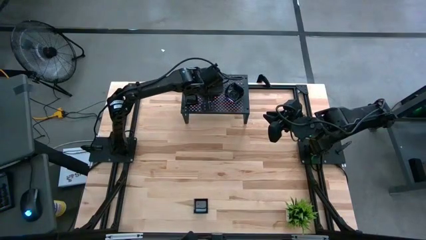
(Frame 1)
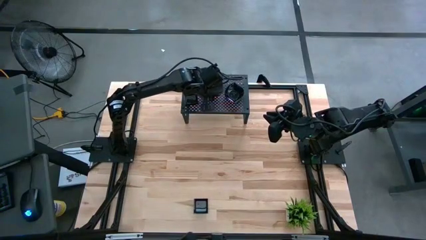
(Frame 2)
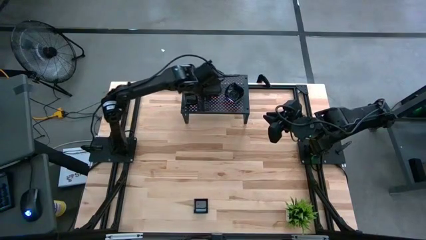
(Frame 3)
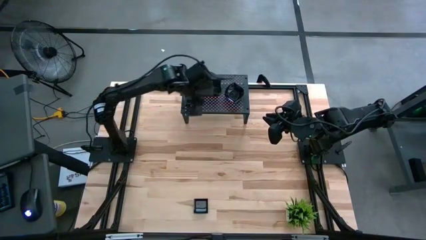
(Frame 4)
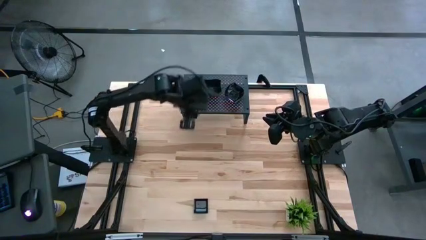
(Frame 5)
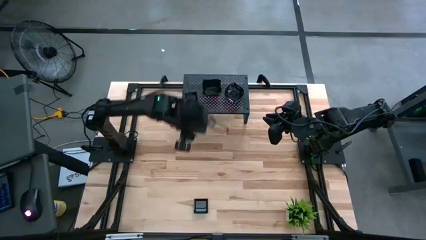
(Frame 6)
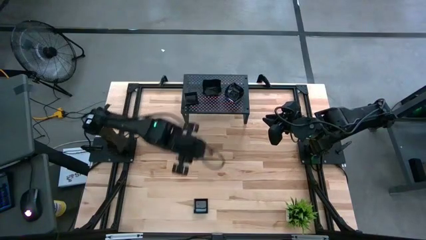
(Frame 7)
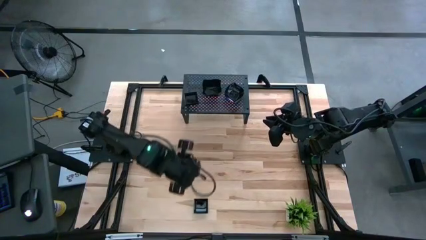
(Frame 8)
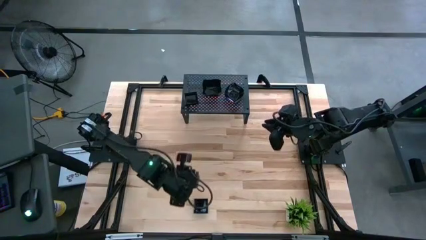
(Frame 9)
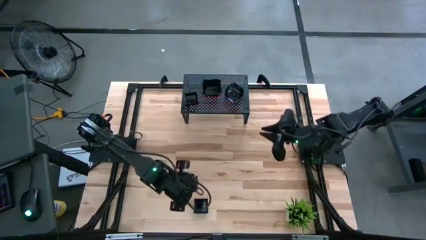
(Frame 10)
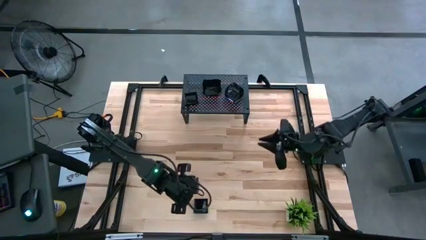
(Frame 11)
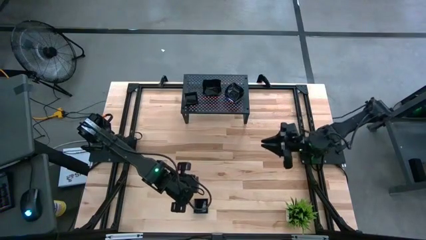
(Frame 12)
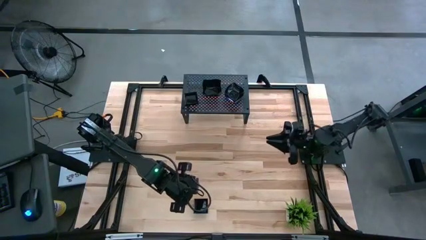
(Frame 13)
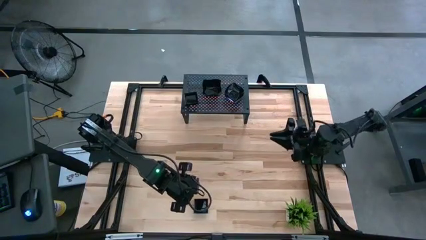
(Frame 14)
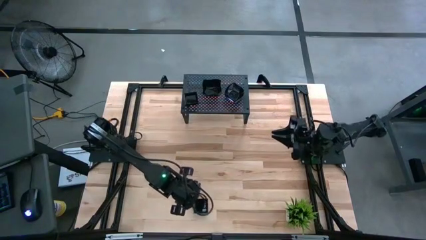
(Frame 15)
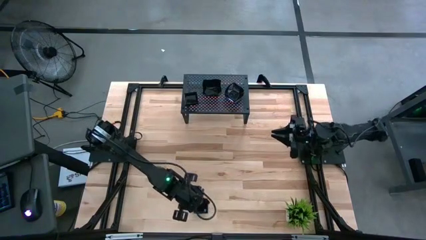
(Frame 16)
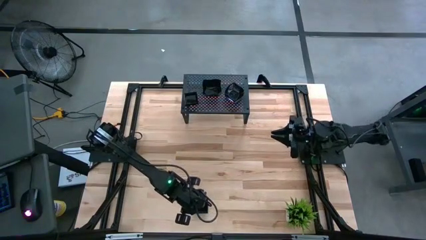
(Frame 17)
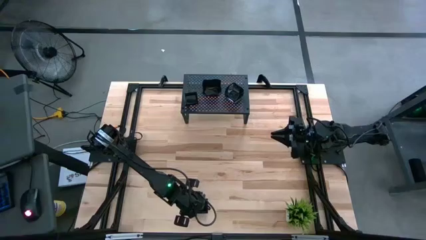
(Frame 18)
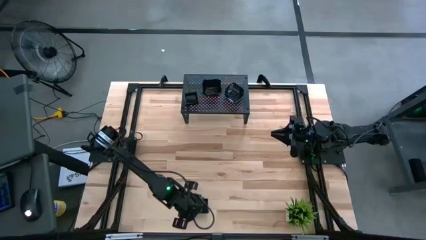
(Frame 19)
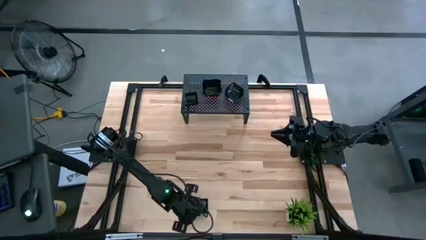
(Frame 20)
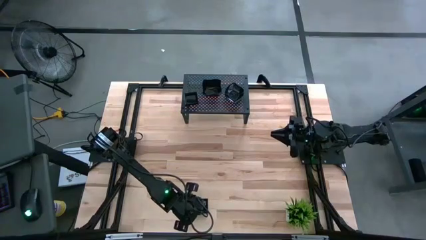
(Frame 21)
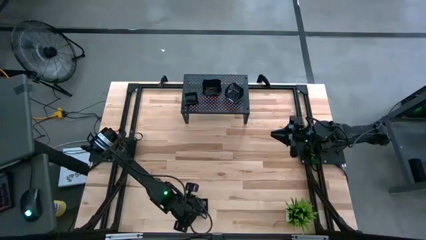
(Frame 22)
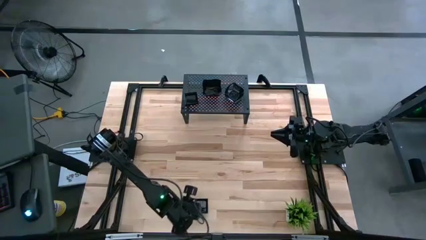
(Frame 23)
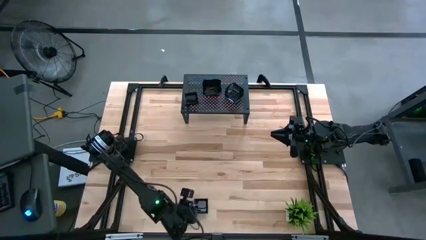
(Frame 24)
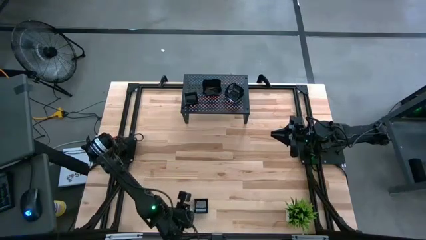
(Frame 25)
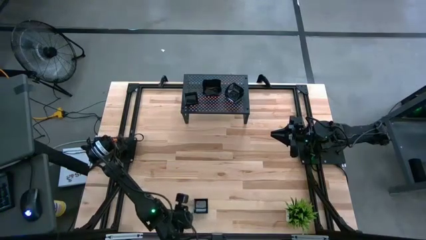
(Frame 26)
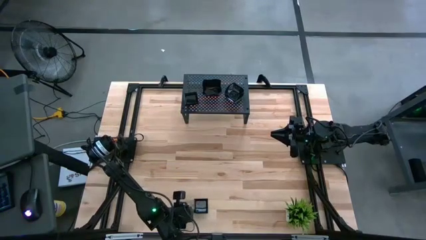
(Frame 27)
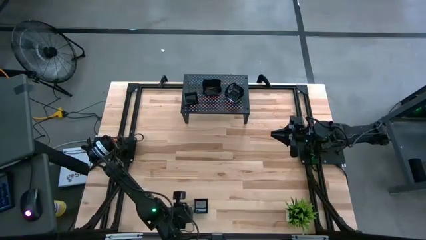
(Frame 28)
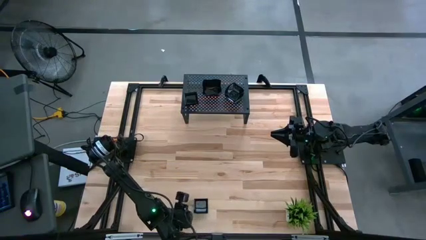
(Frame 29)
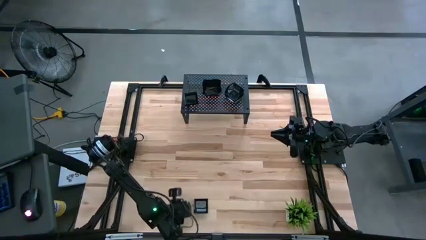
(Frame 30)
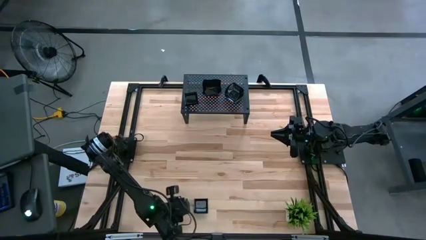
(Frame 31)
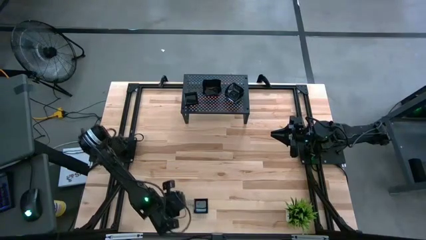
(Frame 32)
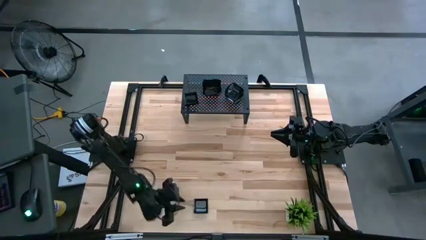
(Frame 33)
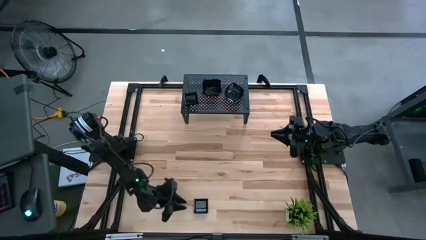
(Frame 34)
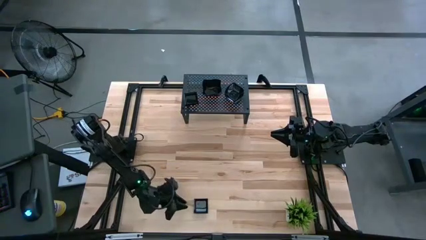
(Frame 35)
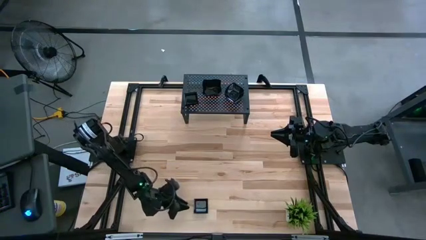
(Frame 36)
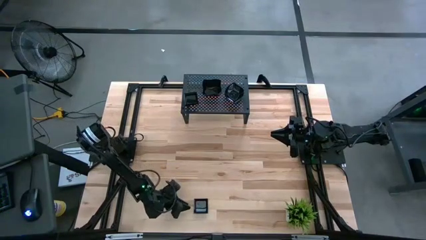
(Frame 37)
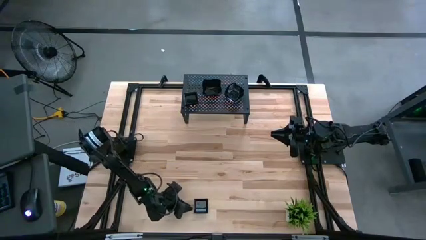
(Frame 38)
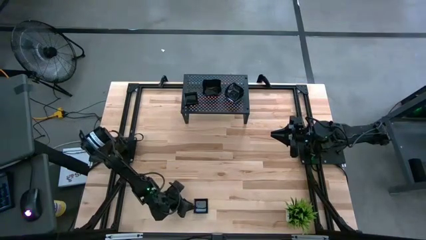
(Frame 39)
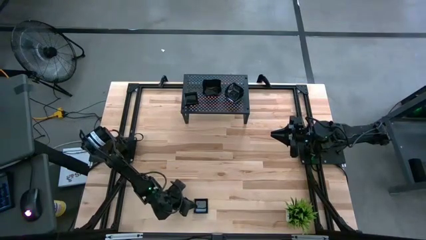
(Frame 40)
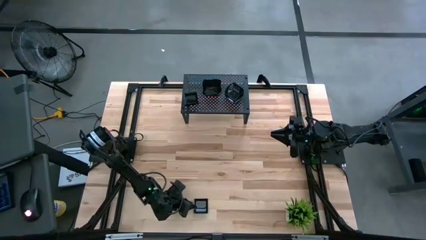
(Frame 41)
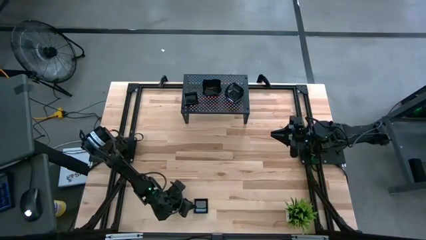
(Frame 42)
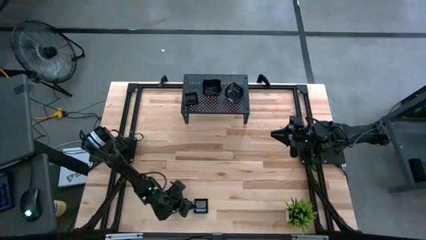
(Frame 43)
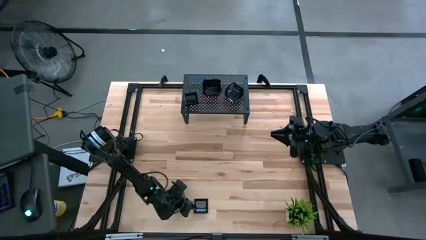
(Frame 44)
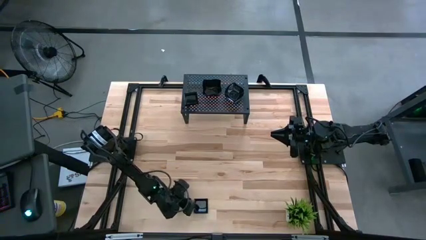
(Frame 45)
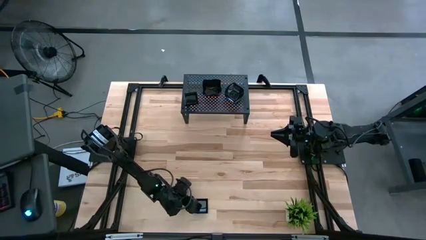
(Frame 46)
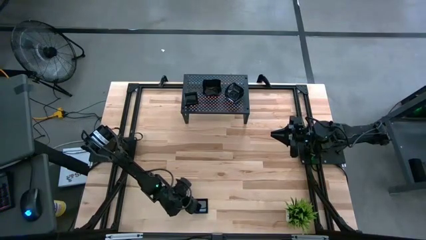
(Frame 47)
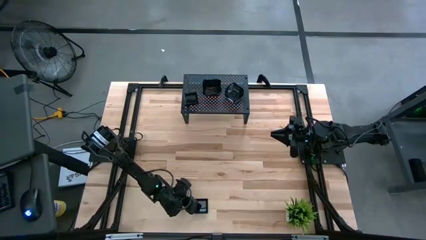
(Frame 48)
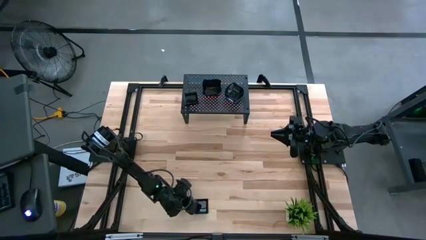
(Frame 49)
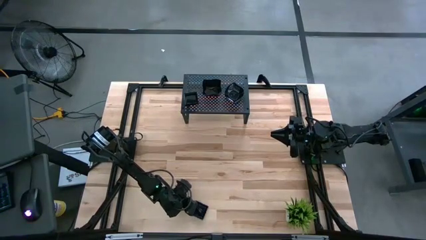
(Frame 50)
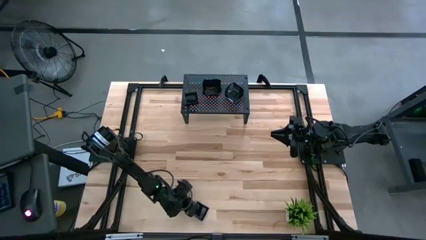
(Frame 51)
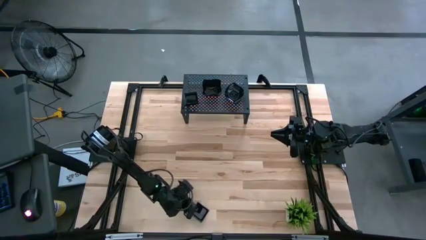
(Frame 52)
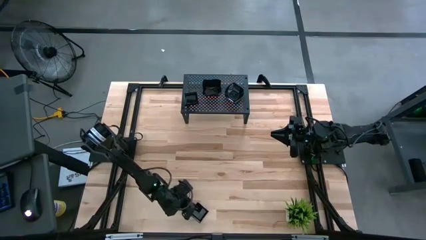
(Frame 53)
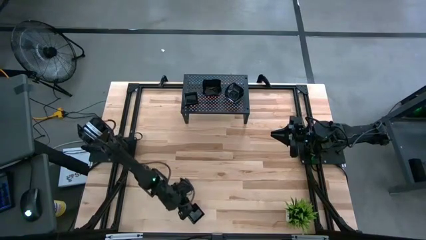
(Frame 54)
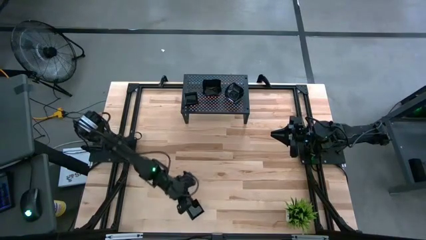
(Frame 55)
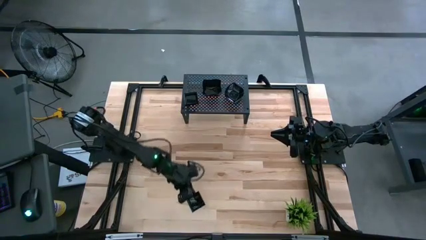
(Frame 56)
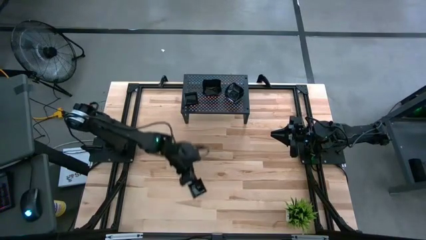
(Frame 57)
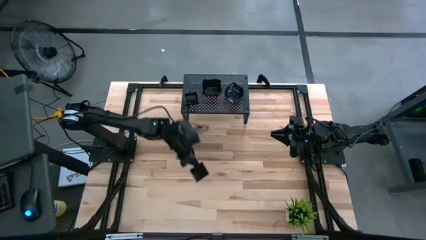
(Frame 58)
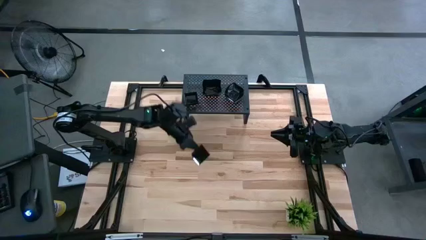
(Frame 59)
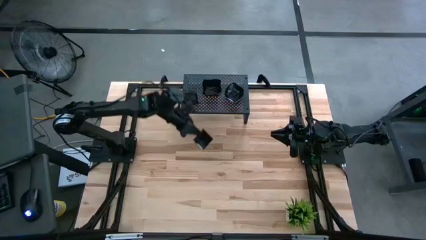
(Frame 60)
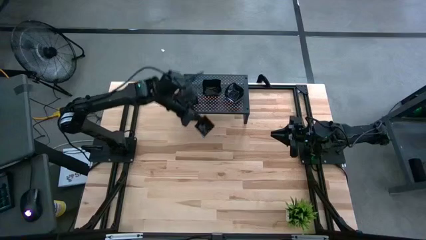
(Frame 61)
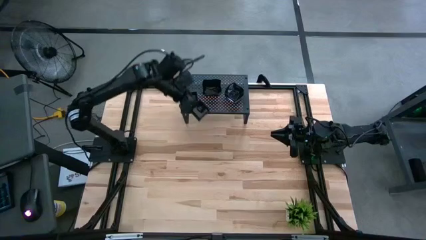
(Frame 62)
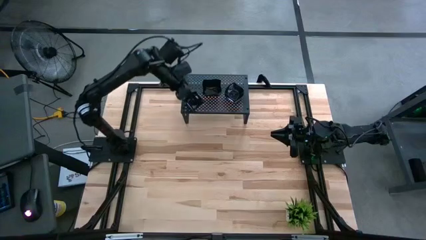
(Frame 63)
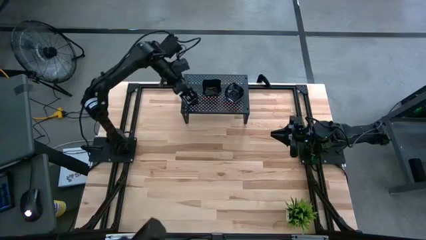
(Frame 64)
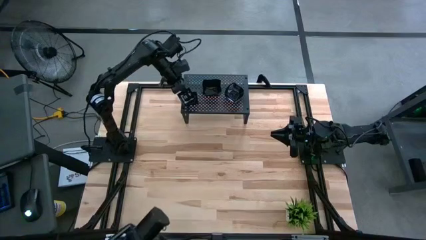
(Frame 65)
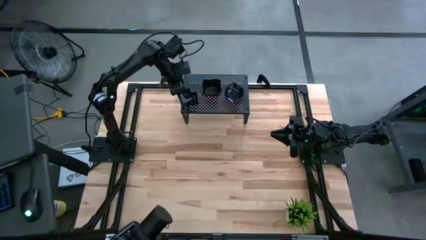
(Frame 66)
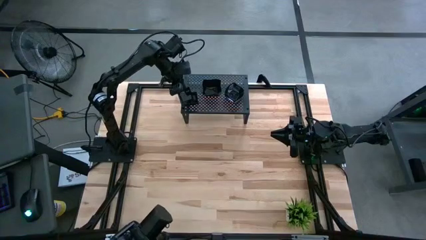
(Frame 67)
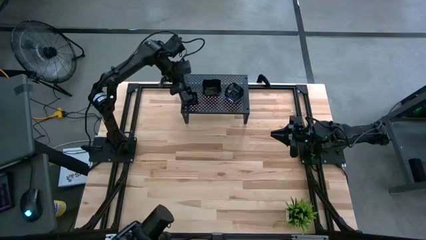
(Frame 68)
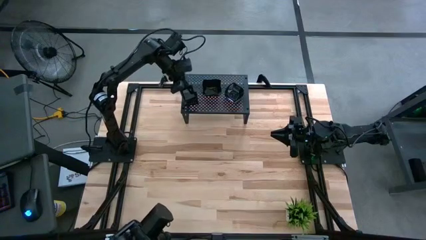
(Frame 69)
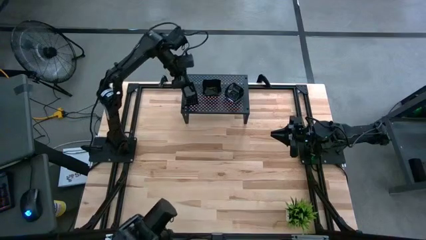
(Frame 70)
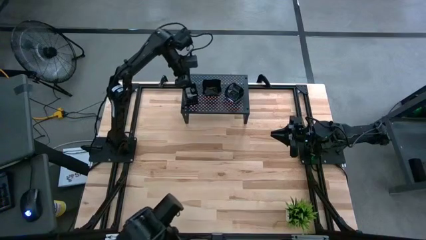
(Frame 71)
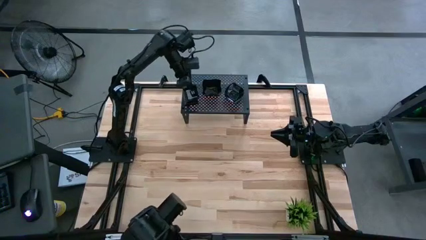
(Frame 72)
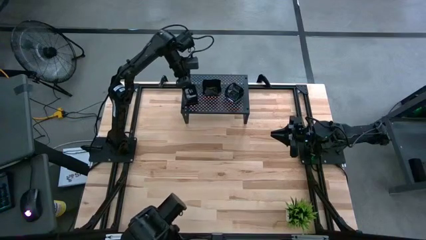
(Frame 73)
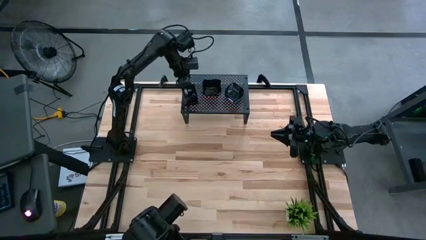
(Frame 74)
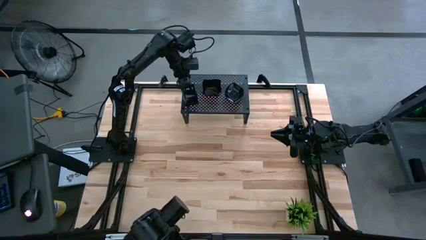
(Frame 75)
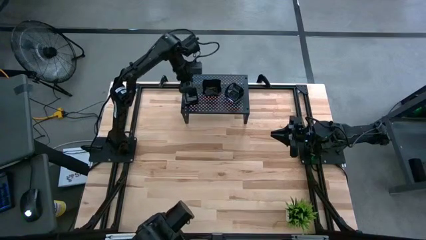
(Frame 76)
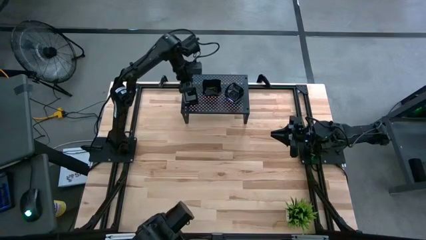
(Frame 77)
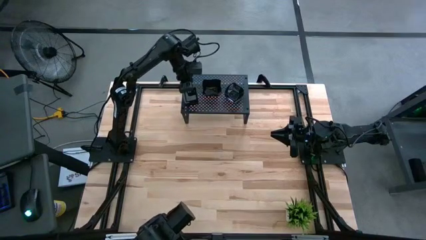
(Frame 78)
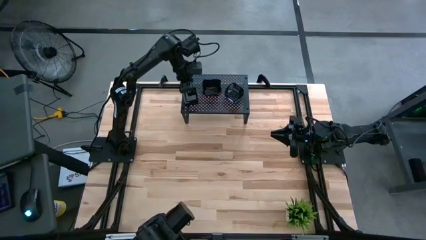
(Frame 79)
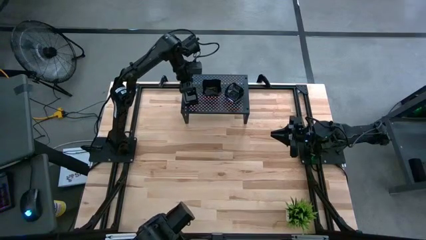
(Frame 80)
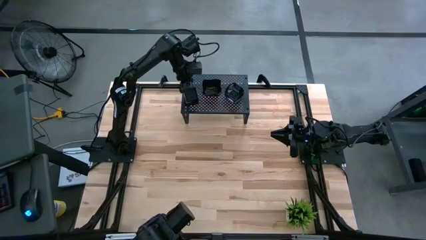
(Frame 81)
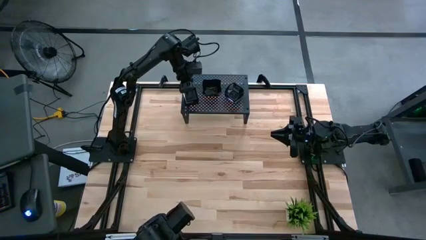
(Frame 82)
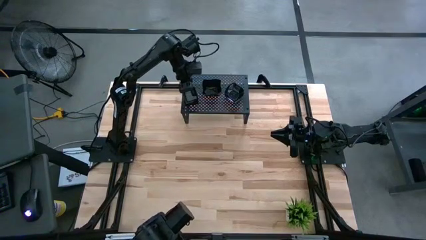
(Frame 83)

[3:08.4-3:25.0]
Task: Pick & Place Mini shaped plates
Stack the square plate on top of the square plate on the shelf
